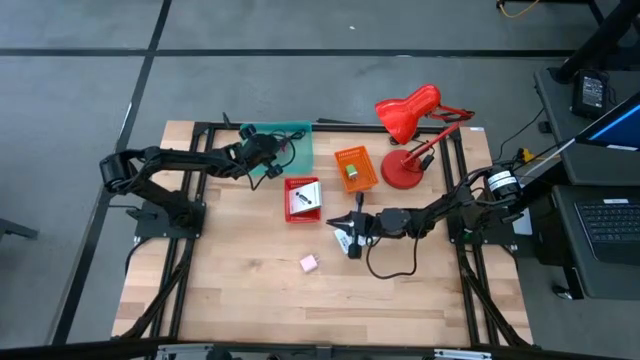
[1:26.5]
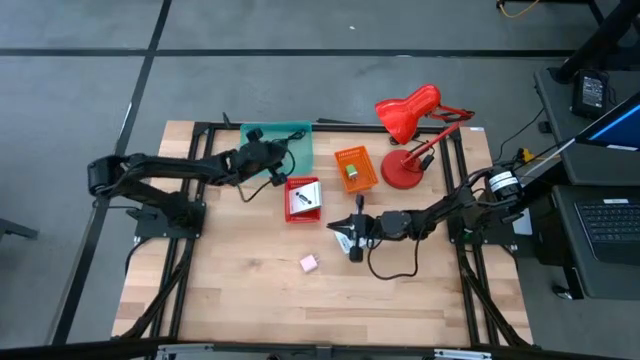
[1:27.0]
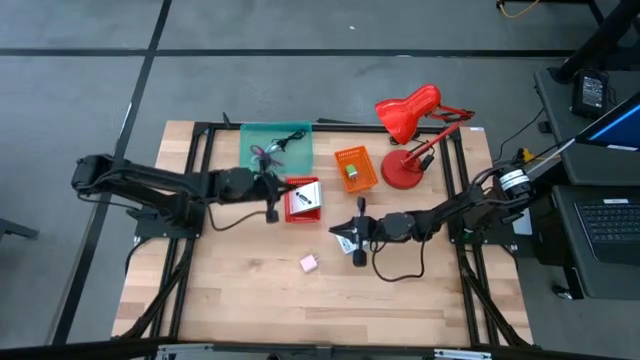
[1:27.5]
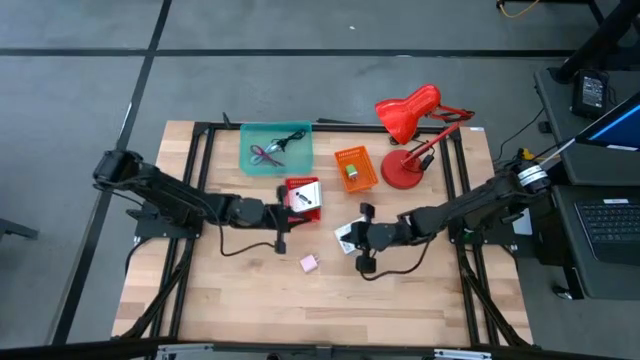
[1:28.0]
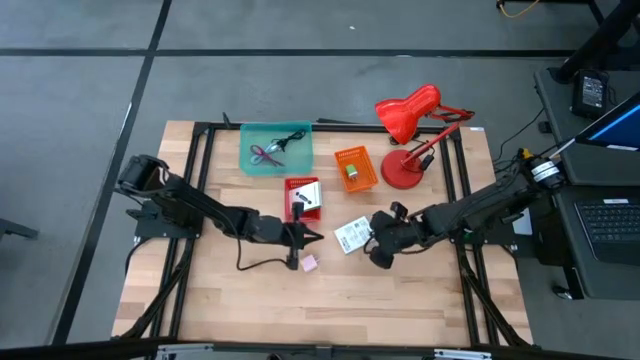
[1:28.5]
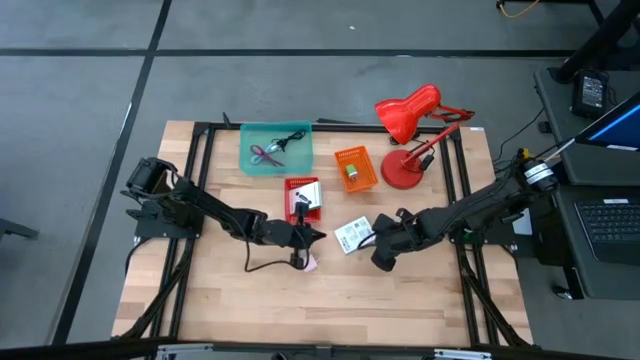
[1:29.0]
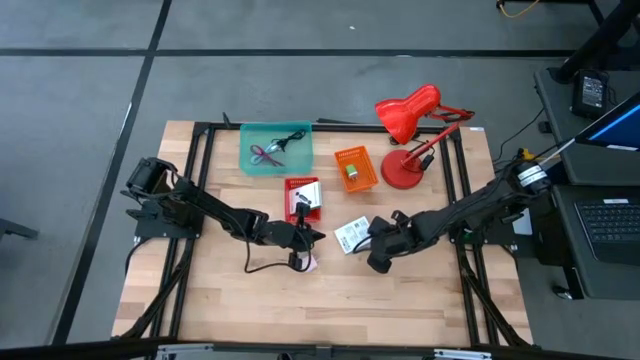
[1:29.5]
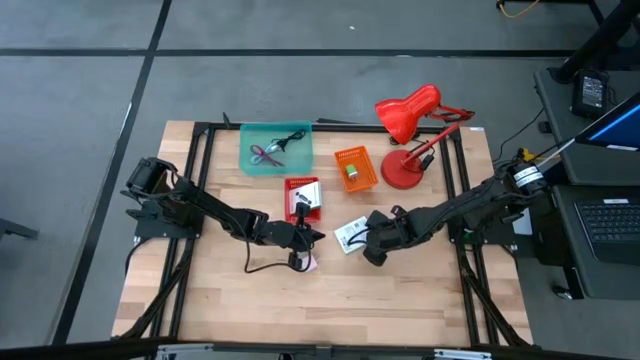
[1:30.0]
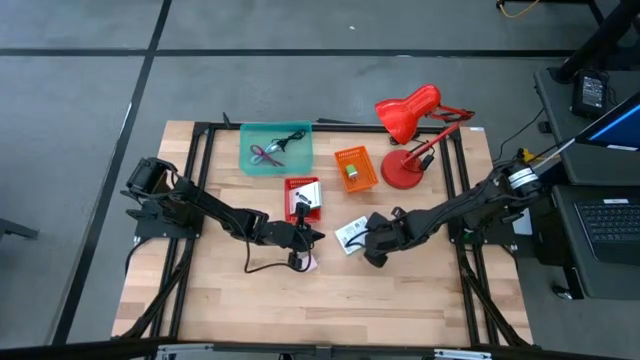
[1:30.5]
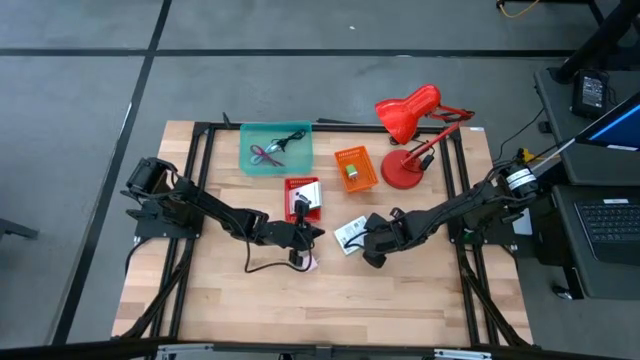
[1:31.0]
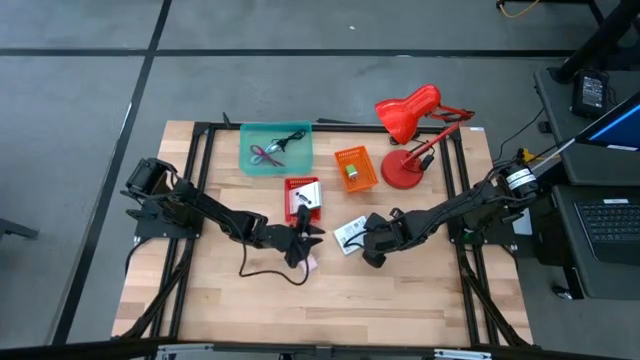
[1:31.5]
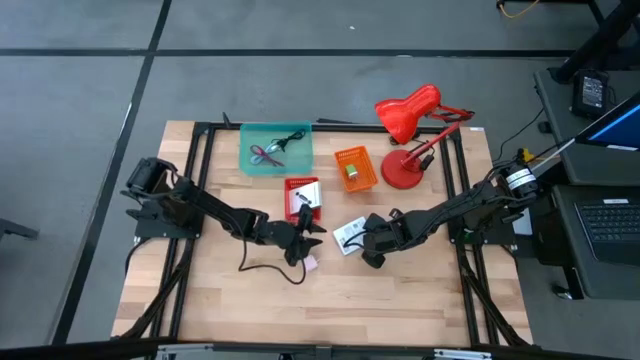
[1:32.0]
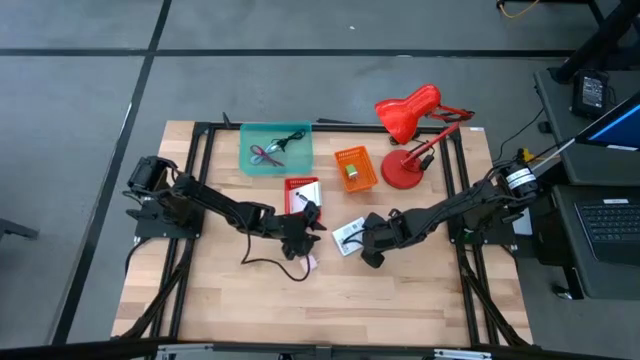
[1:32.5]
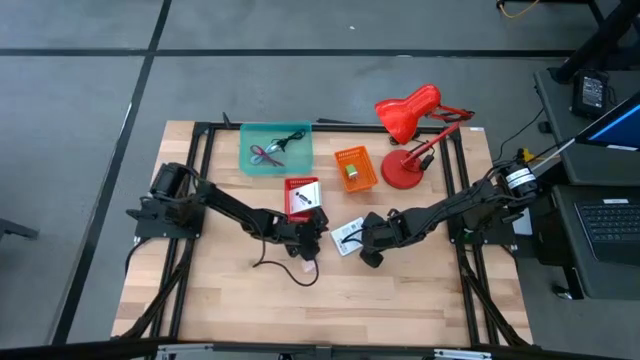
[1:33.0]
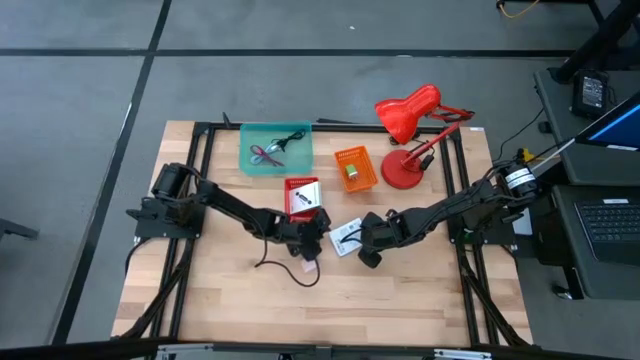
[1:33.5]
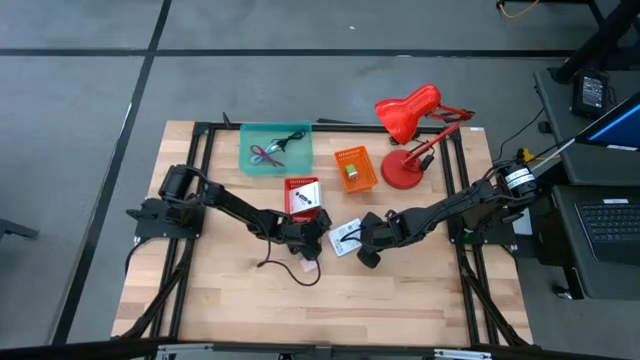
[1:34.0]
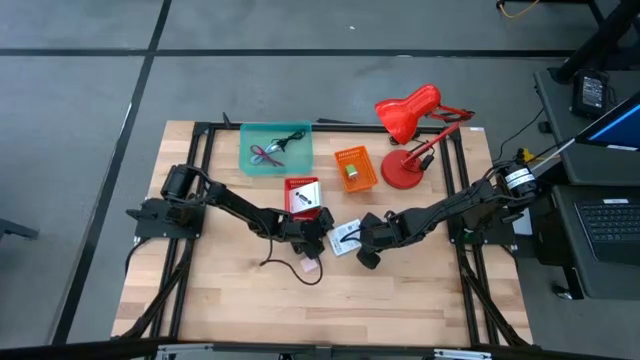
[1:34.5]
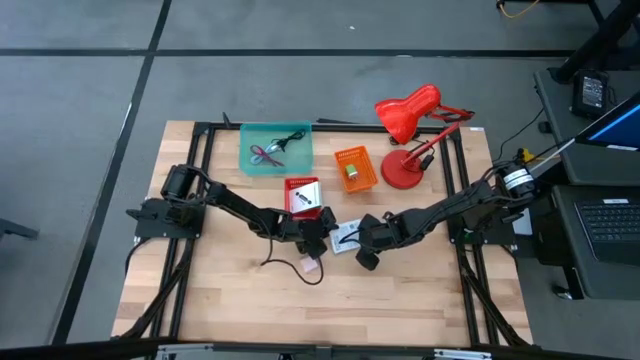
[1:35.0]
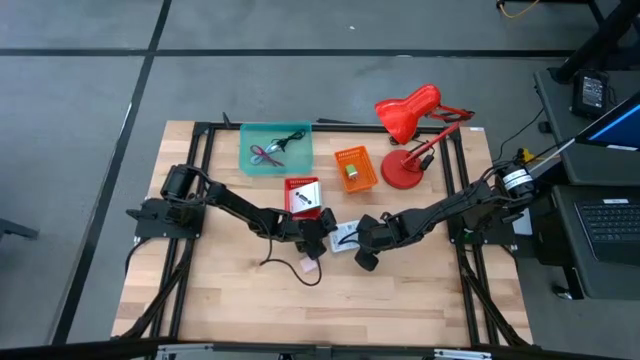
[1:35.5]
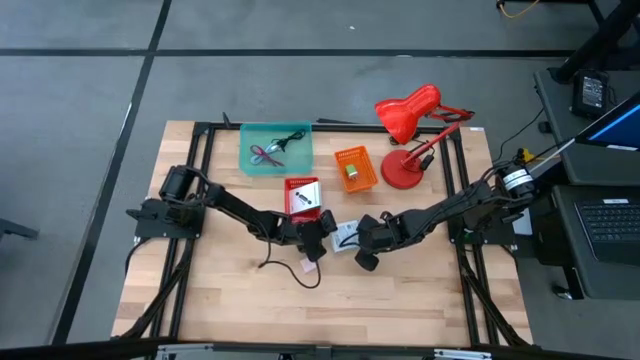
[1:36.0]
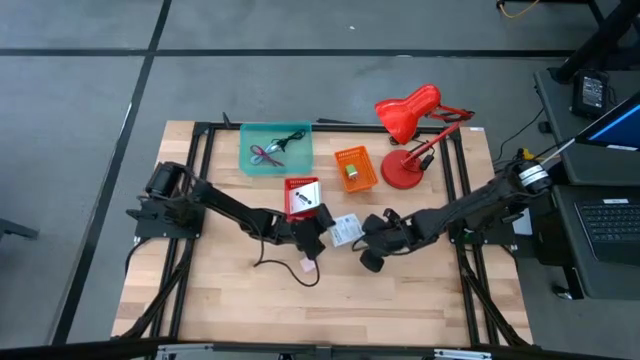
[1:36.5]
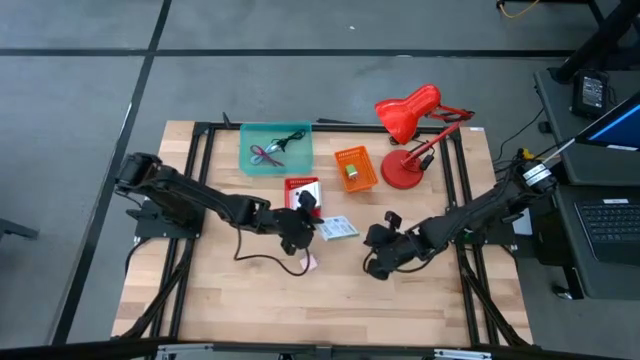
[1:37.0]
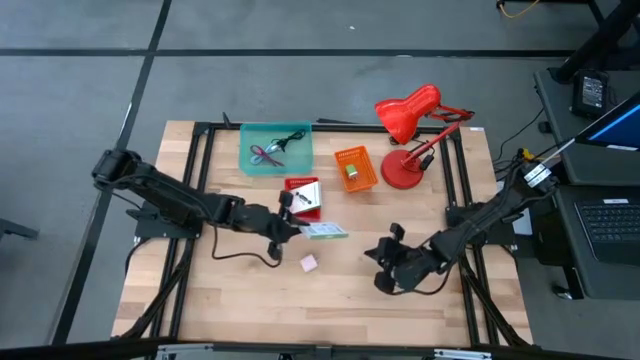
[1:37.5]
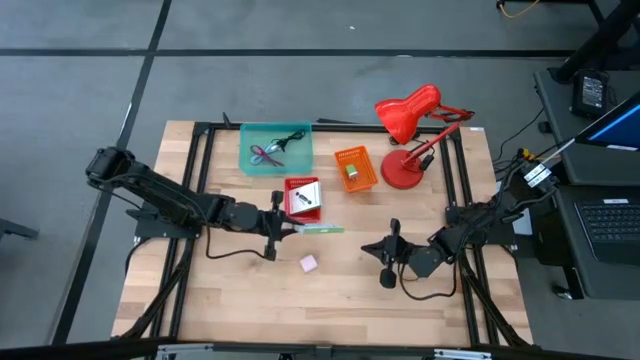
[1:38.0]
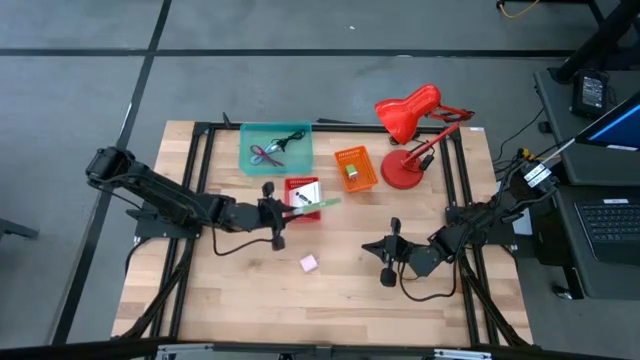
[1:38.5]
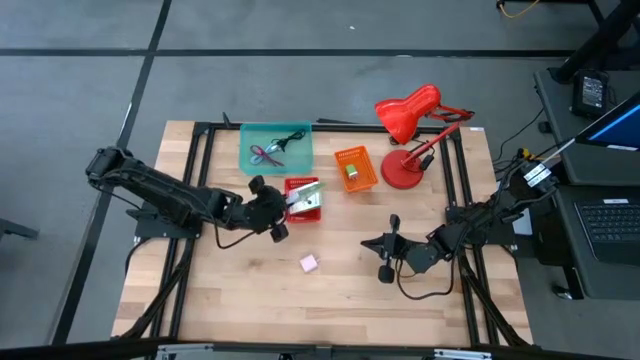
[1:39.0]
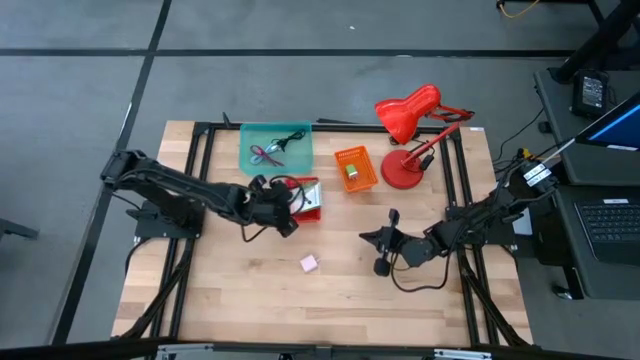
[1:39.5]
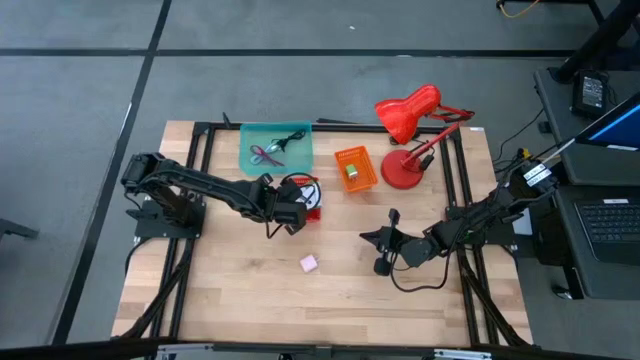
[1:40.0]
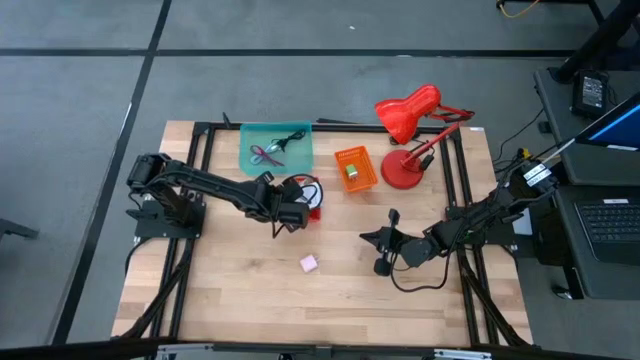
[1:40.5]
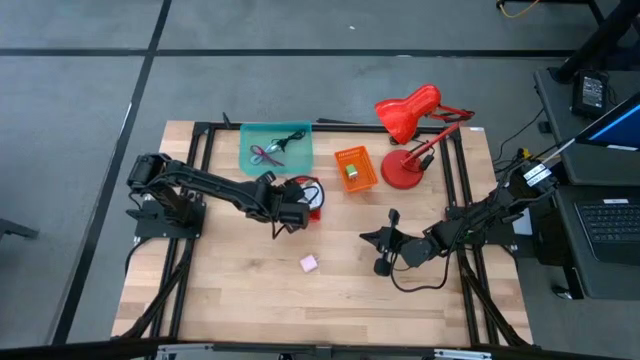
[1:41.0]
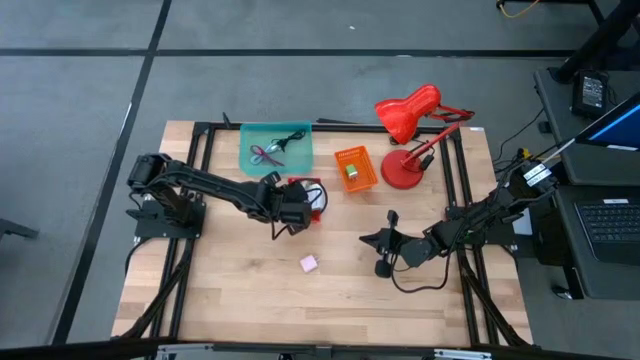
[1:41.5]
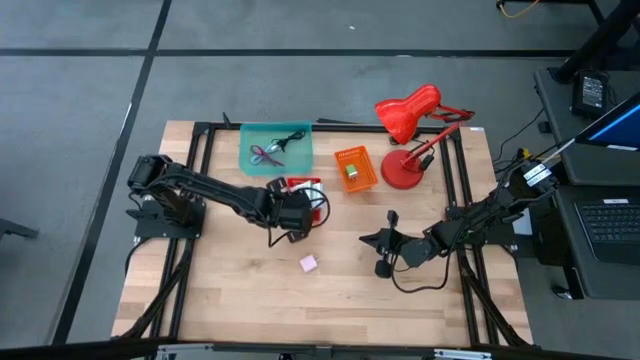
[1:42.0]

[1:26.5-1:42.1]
Task: Pick and place items into bin
Put the card reader box into the red bin

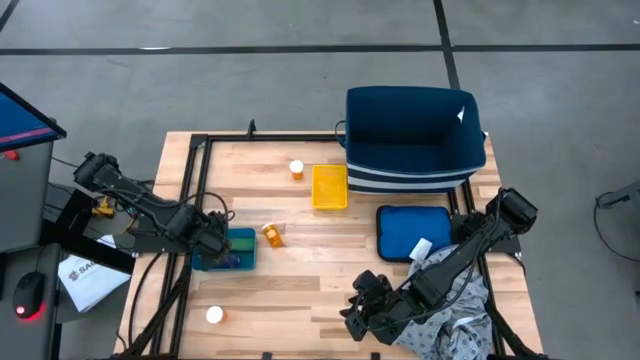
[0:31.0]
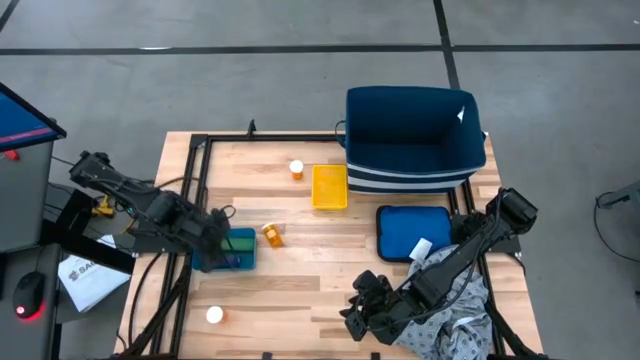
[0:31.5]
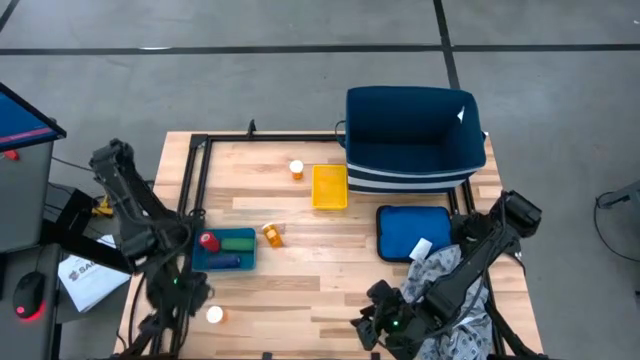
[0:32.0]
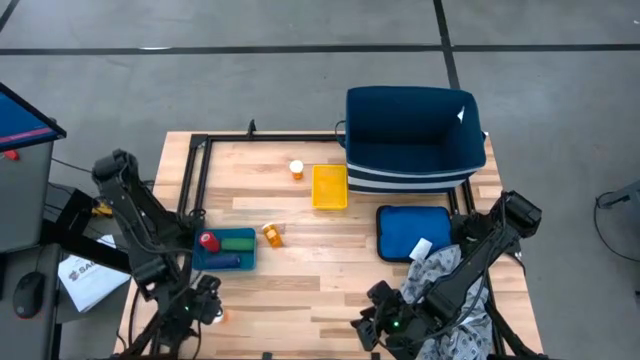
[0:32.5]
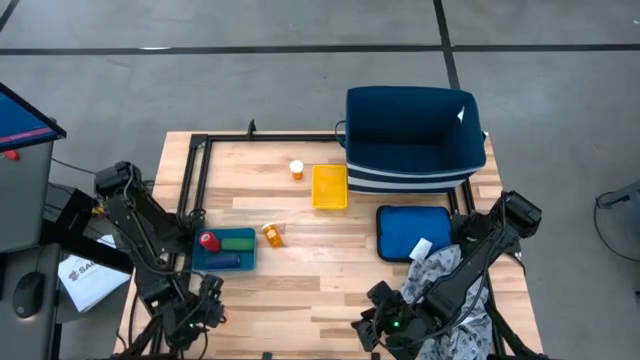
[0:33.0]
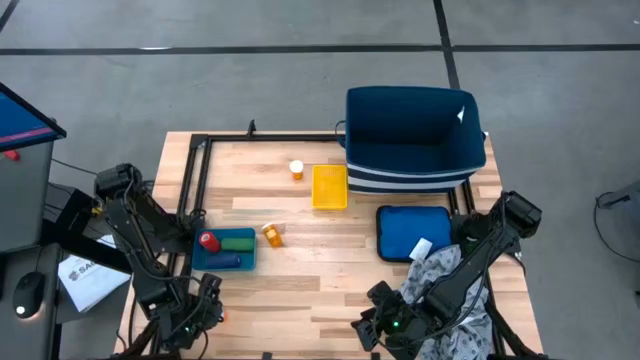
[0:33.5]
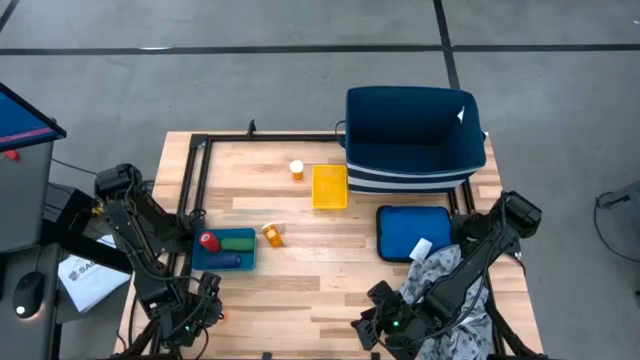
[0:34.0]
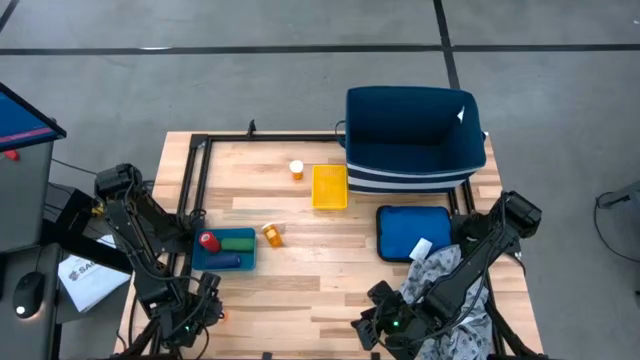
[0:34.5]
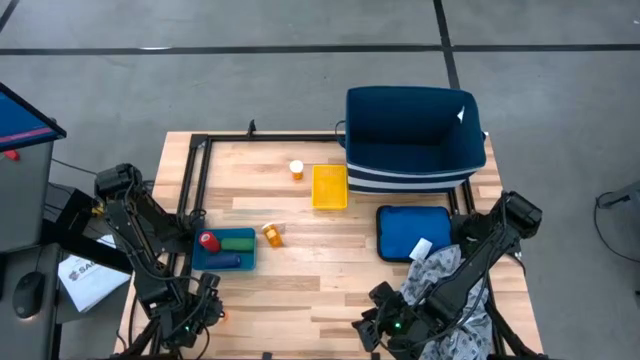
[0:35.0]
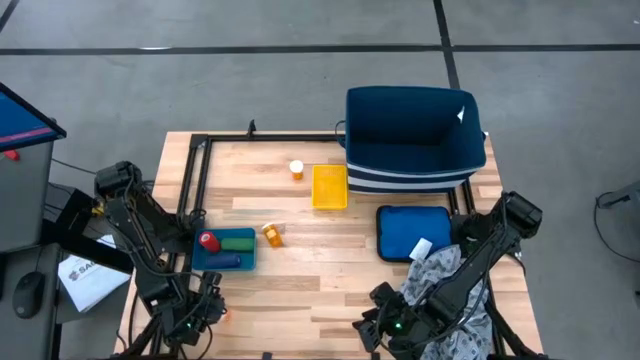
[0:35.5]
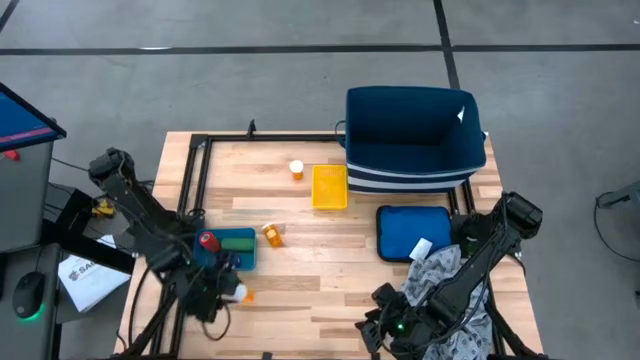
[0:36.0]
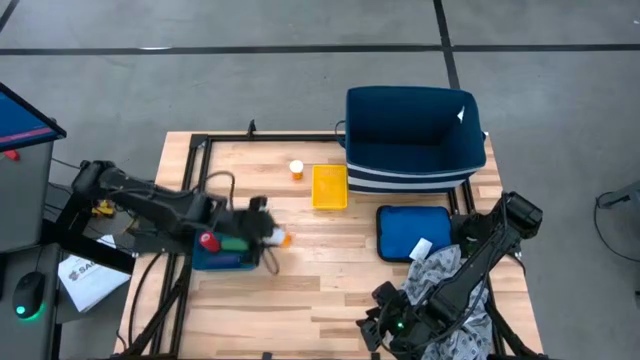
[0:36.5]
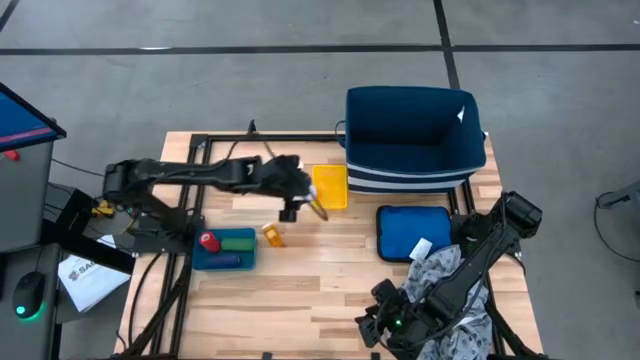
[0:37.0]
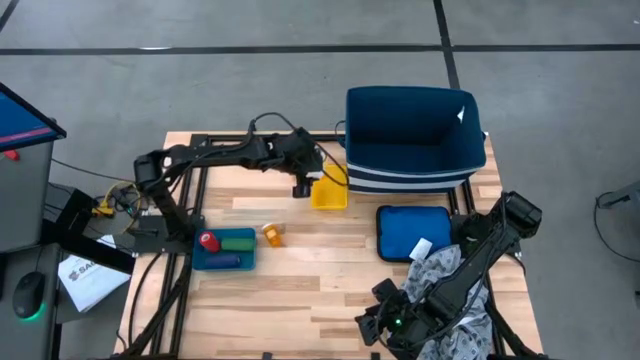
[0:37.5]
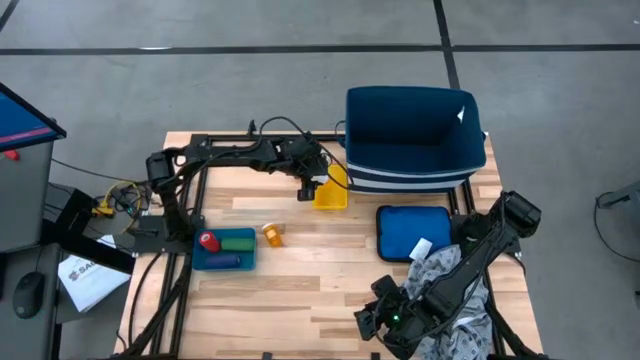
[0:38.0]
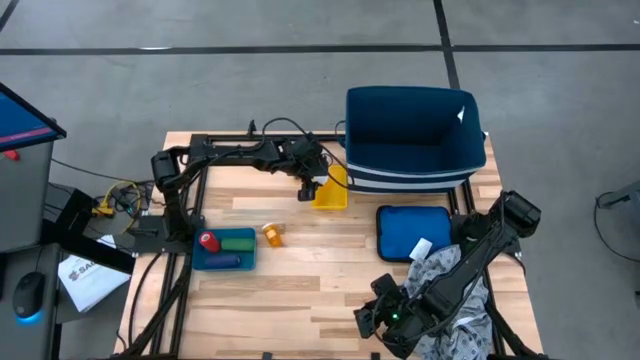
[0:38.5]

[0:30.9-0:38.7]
Task: Pick & place medical supplies in basket/bin
Put the bottom orange pill bottle into the yellow bin
